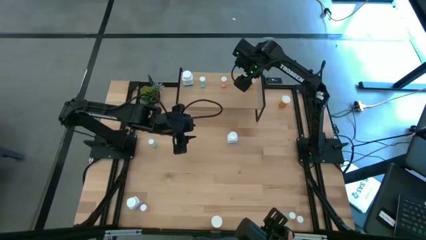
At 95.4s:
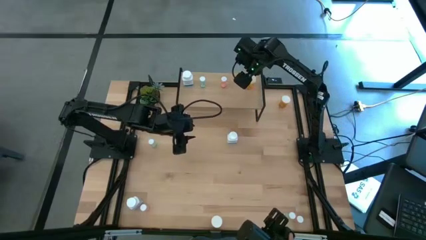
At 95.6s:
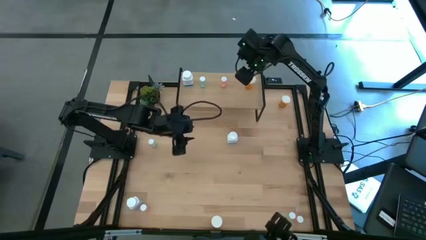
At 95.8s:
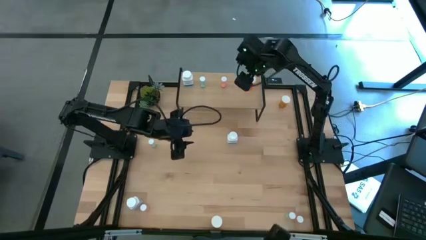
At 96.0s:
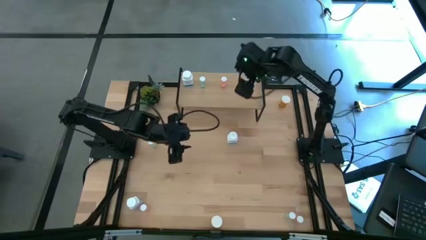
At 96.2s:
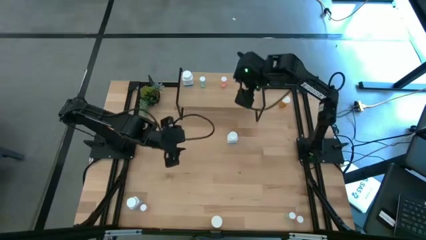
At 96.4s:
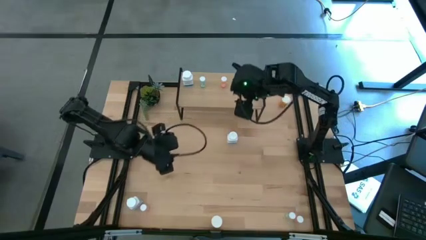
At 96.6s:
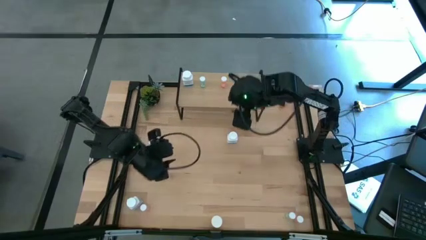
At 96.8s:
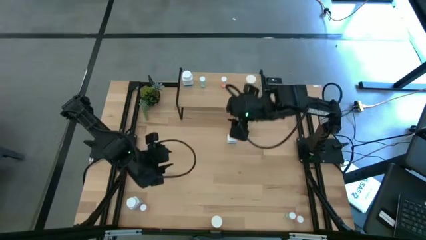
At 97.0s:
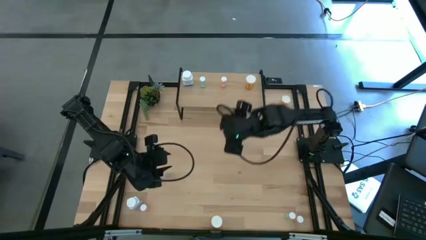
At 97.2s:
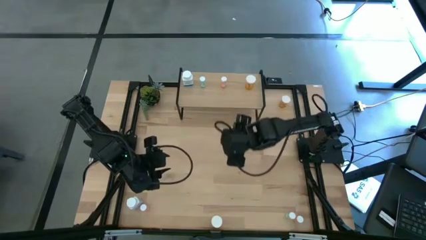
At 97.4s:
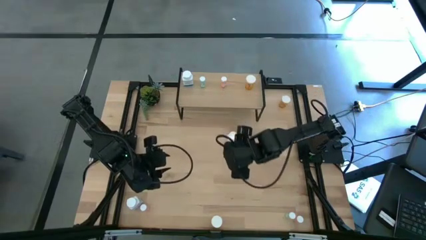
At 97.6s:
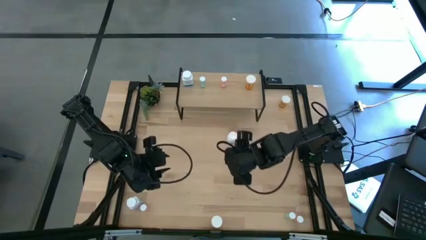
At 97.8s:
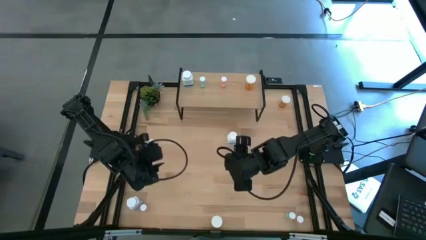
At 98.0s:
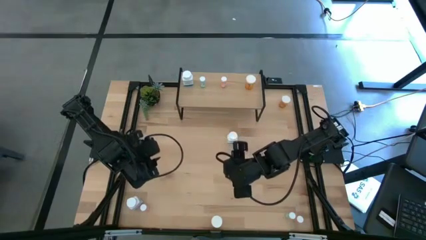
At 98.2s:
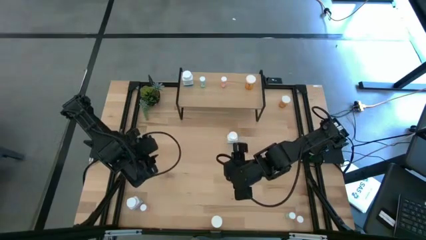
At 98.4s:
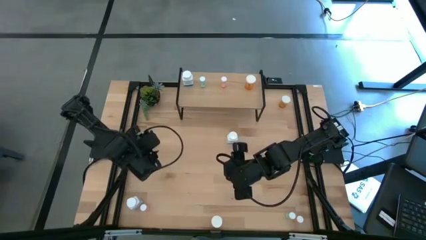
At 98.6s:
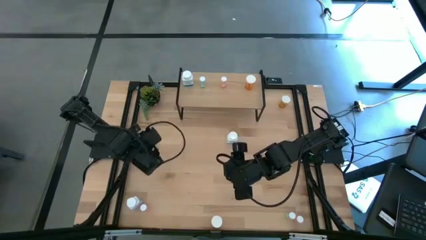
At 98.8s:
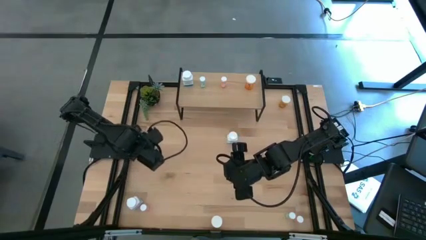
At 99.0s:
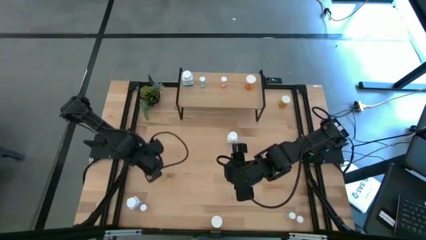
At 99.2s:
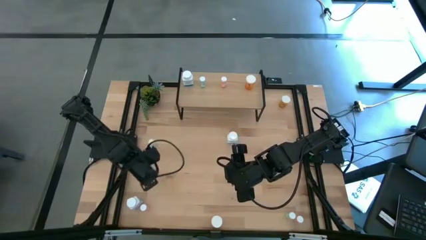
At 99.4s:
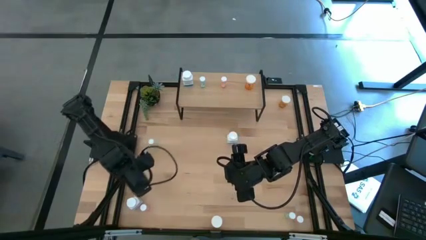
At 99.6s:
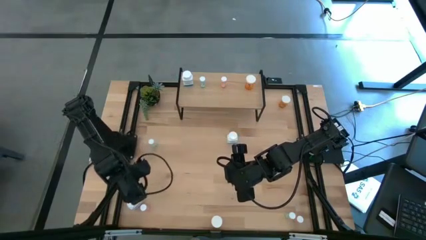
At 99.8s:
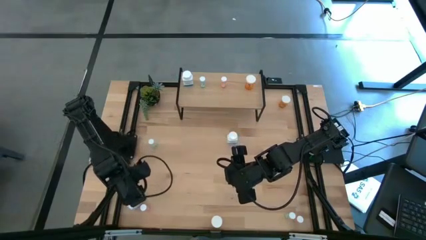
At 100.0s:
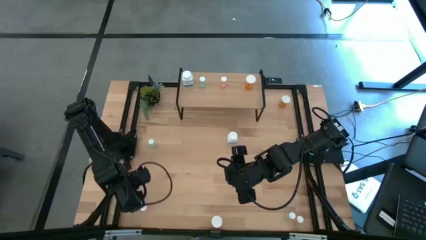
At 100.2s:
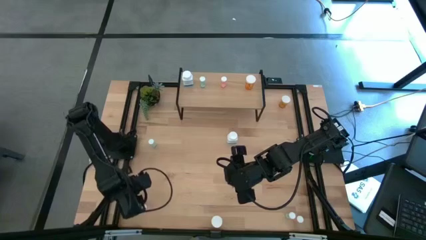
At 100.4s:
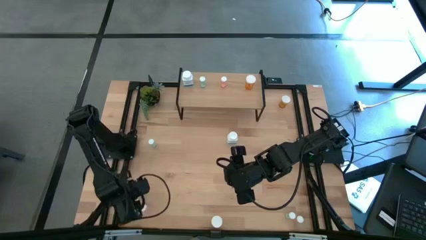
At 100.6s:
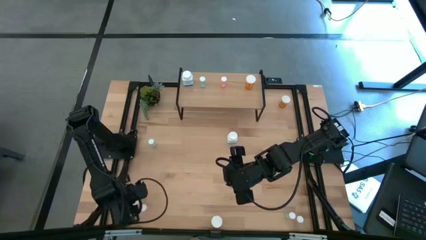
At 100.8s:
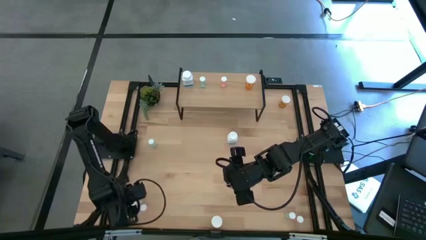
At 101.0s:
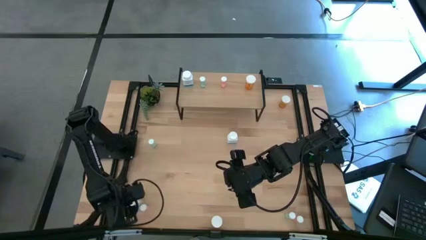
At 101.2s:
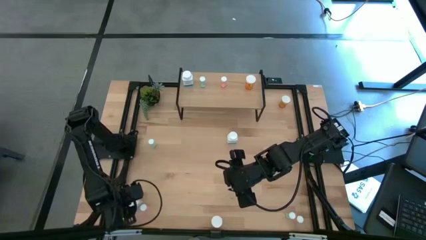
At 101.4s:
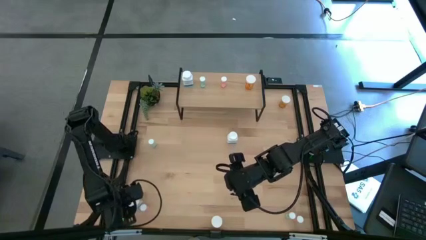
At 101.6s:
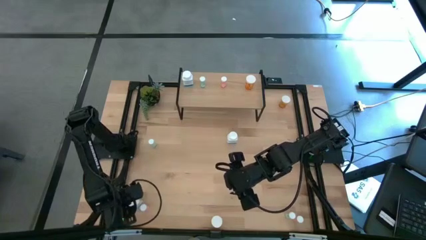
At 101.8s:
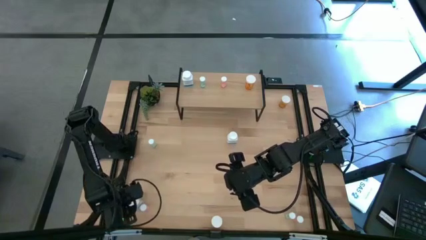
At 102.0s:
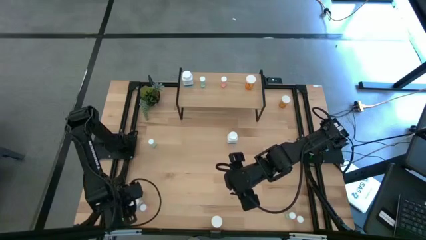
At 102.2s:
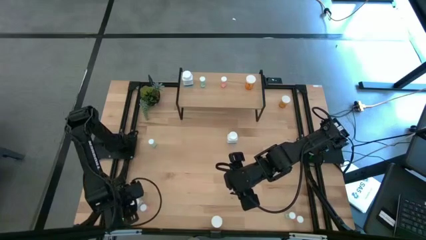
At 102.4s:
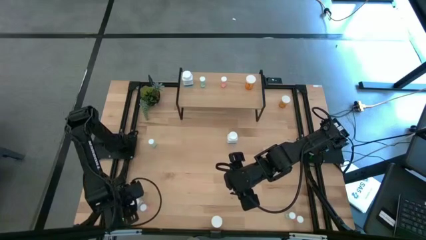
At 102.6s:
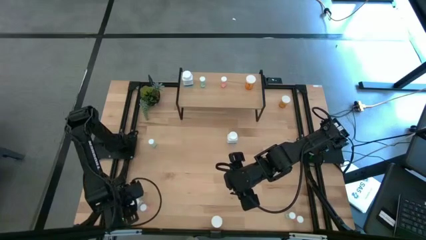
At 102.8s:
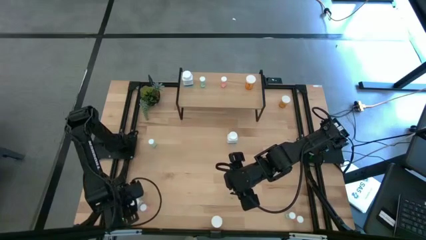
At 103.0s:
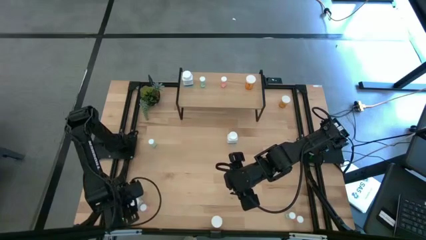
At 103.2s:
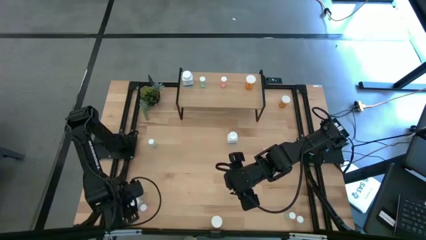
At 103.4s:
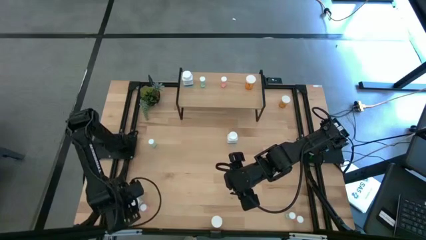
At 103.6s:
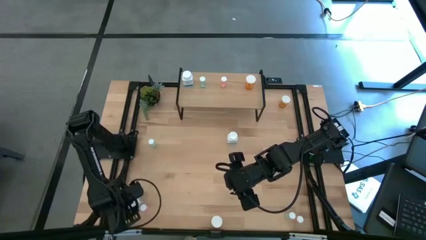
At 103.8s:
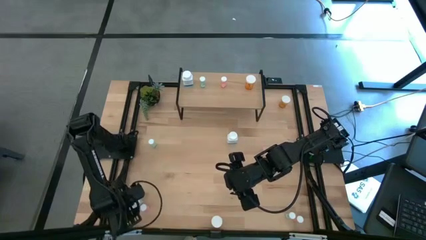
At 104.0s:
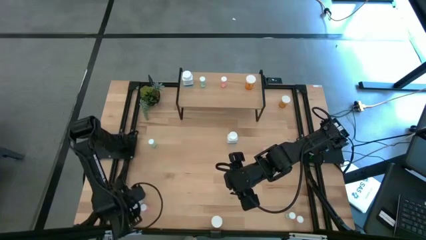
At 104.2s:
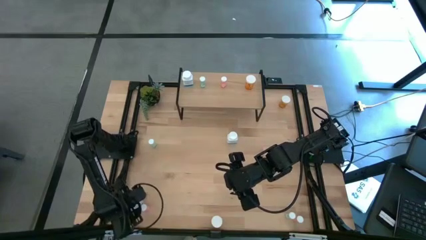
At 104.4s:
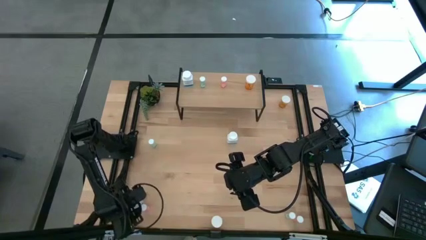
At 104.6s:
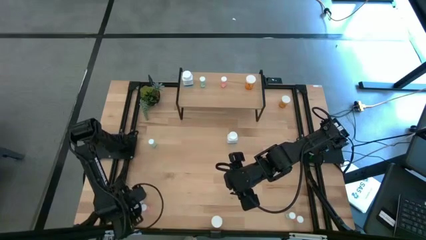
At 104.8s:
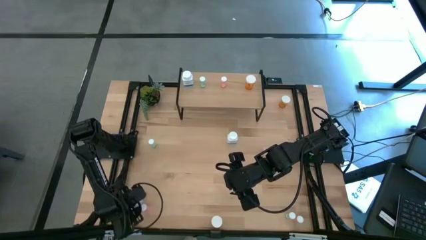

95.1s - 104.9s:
Task: Pick and place medicine bottles onto shelf by color
Put the bottom white pill bottle on the shelf aligned with the other white pill bottle

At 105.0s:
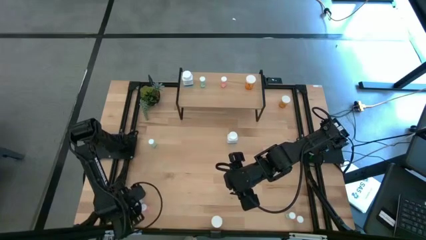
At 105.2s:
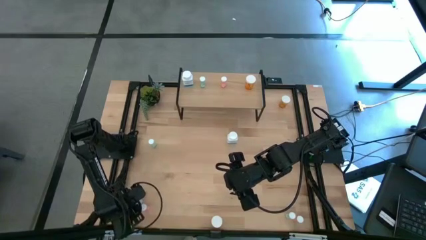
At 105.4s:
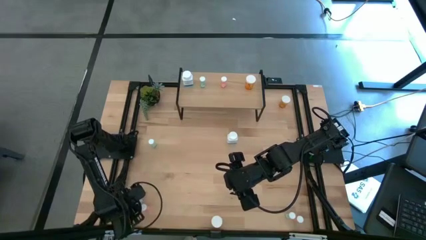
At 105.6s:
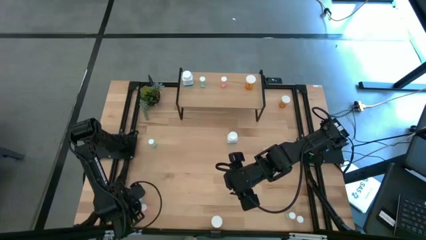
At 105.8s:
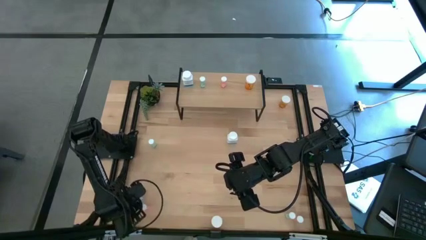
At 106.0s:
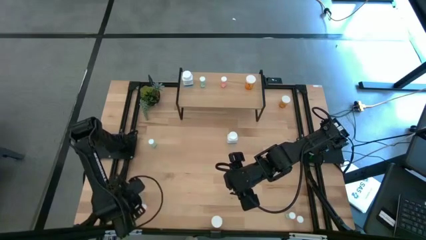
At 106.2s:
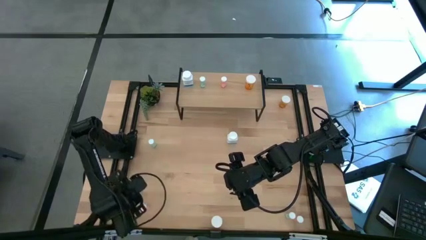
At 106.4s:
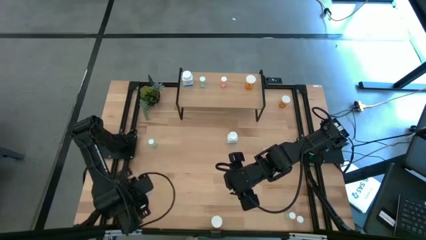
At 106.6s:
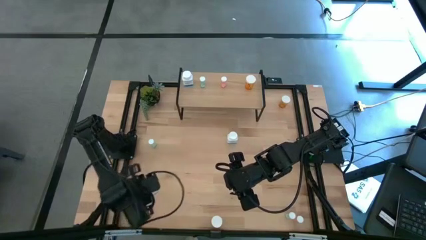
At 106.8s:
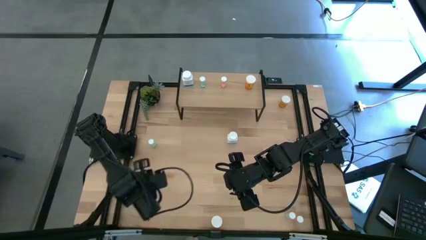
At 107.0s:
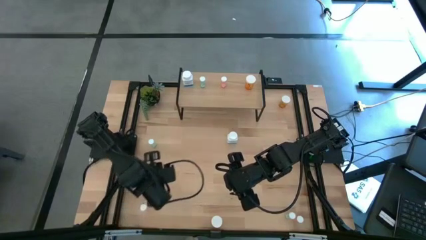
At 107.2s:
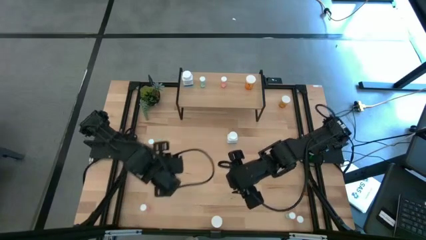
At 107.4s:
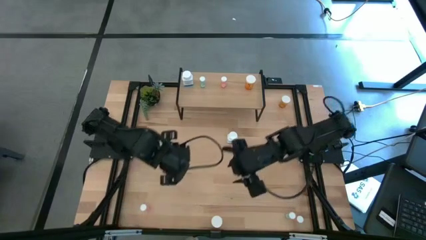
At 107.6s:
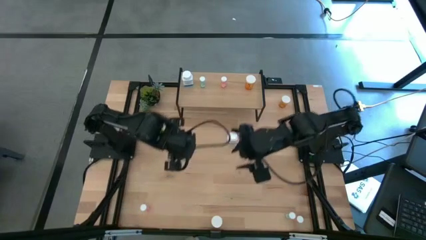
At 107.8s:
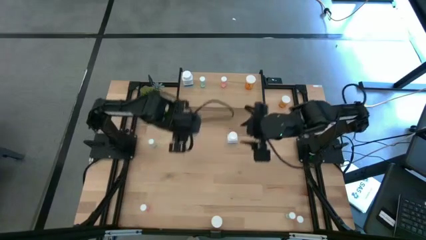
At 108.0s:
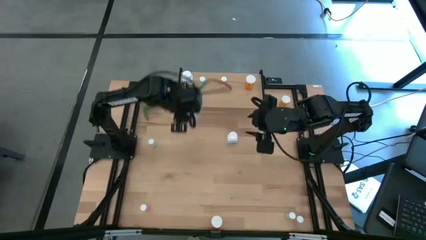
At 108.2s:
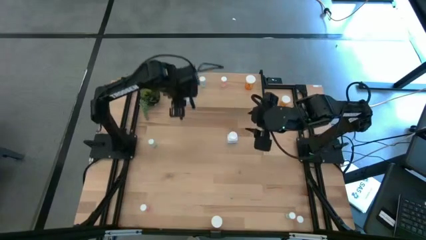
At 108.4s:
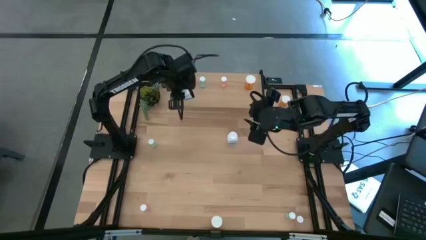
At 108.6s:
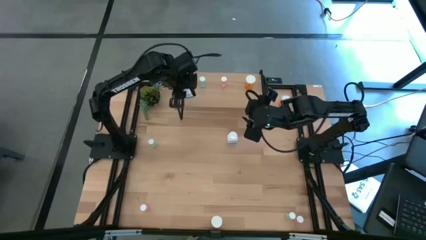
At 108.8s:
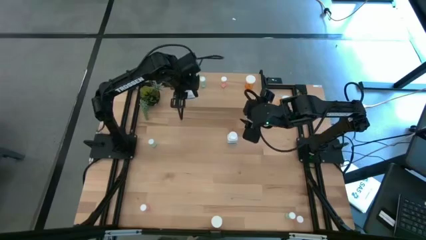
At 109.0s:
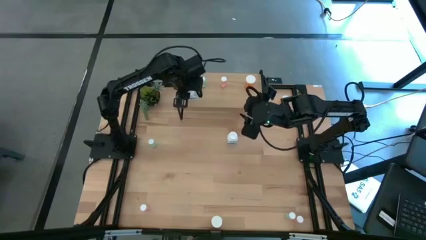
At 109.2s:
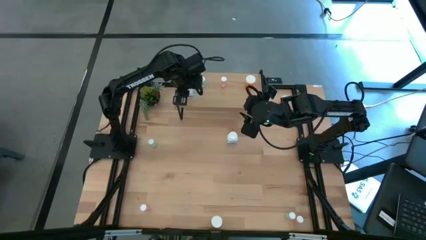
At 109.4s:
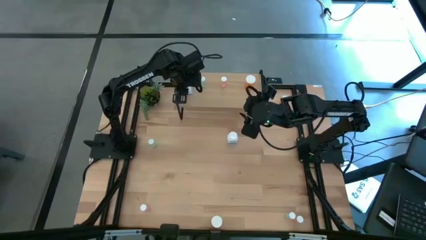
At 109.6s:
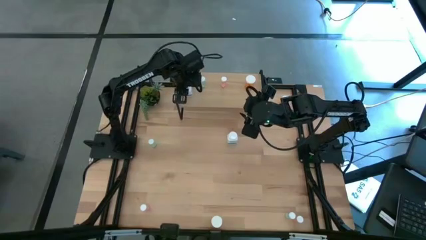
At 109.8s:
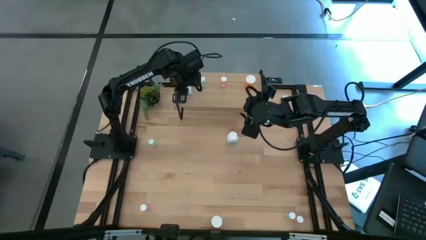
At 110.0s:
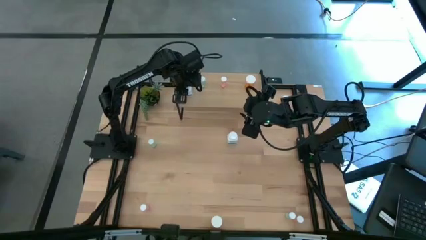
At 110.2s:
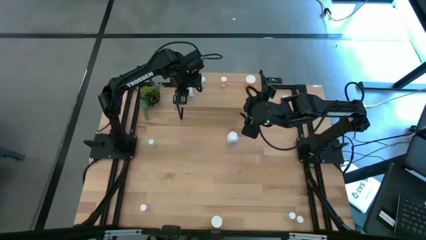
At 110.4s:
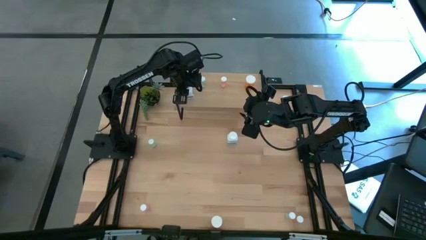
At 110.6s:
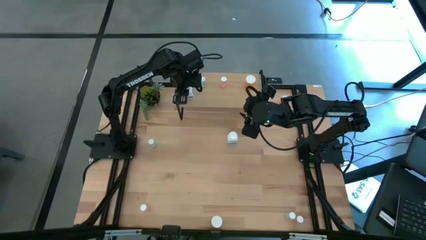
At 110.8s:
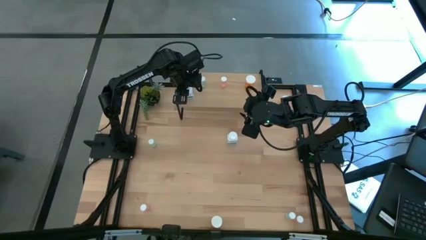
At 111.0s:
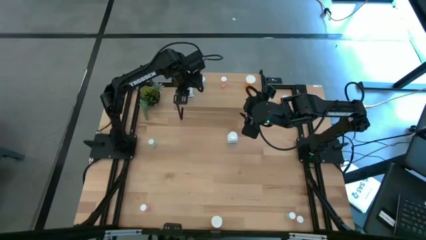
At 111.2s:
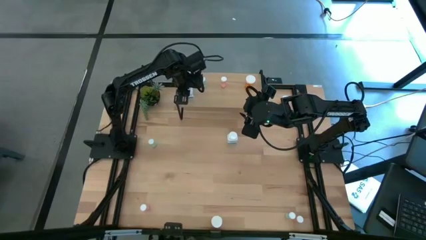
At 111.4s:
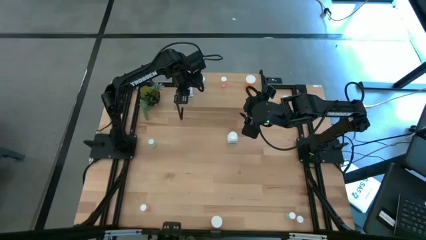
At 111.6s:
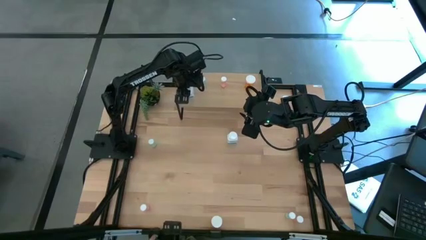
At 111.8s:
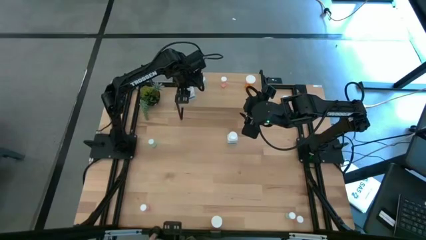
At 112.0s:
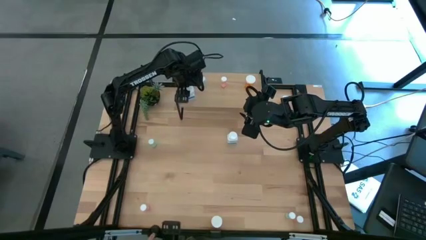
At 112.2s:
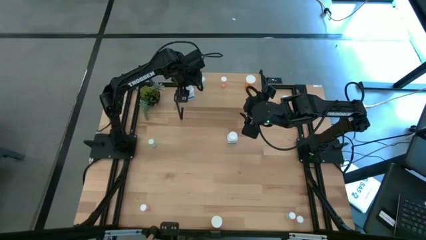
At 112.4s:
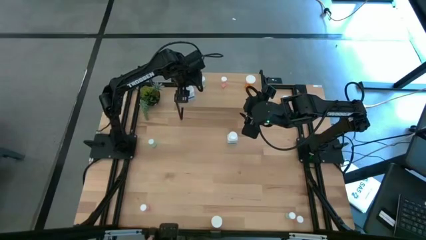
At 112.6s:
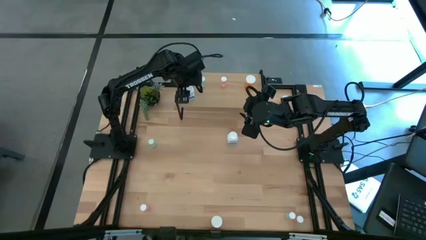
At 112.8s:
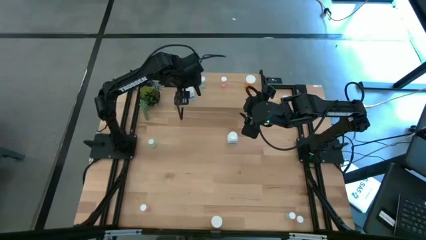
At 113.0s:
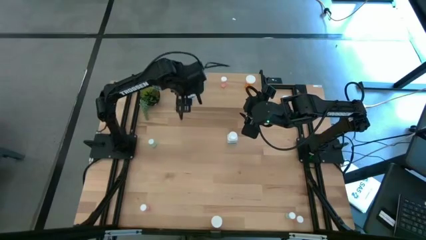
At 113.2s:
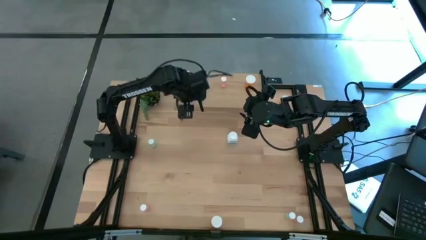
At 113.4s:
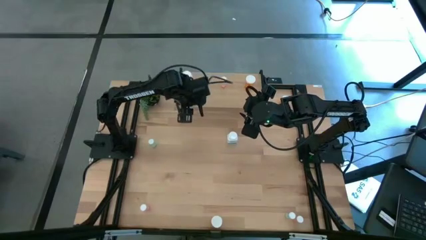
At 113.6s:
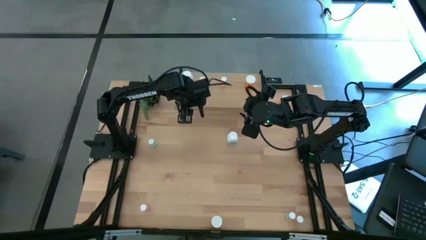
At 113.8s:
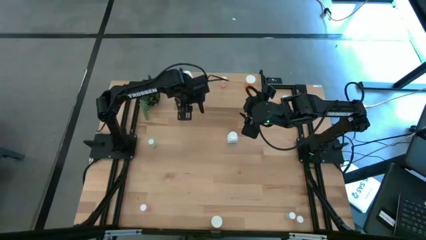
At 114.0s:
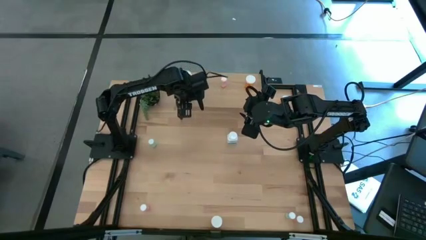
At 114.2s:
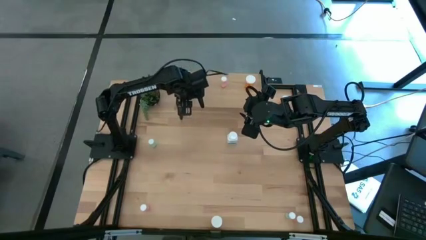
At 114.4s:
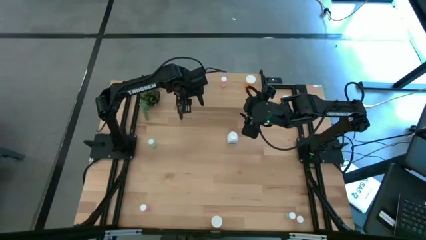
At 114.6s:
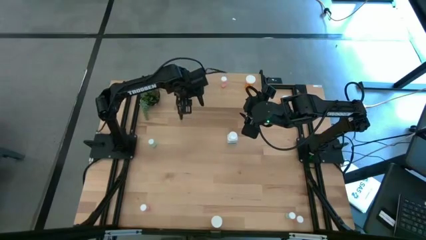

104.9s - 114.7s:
Put the bottom white pill bottle on the shelf aligned with the other white pill bottle
